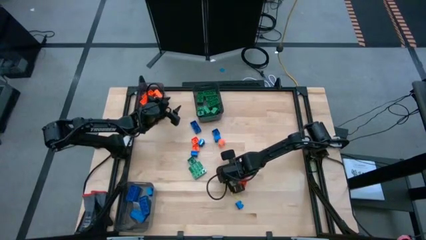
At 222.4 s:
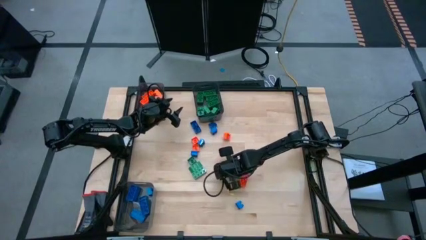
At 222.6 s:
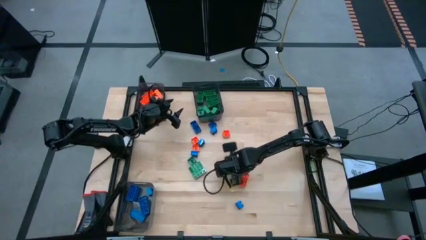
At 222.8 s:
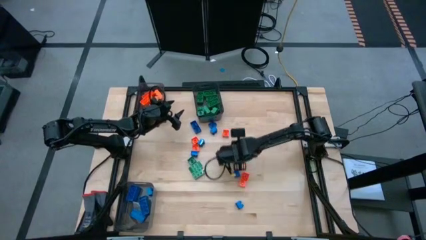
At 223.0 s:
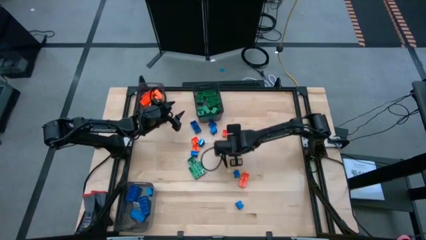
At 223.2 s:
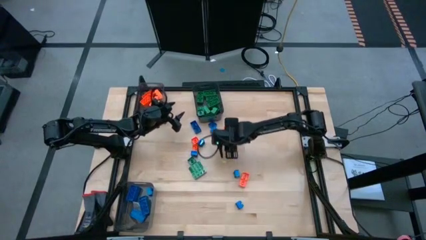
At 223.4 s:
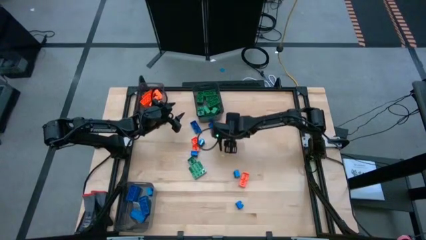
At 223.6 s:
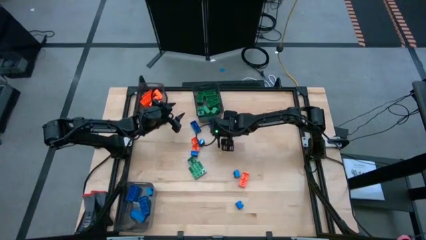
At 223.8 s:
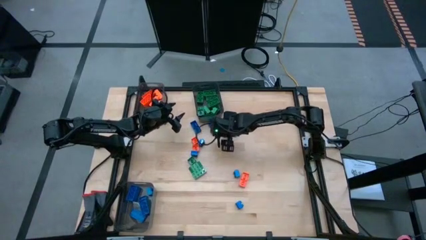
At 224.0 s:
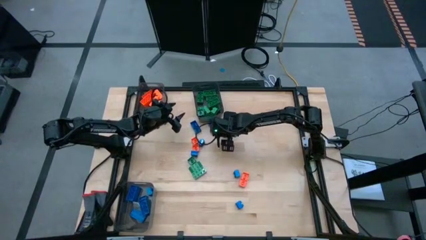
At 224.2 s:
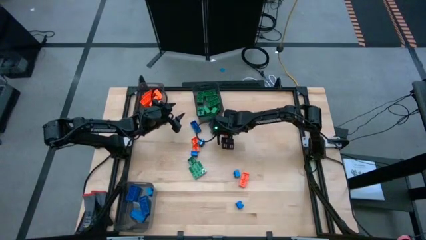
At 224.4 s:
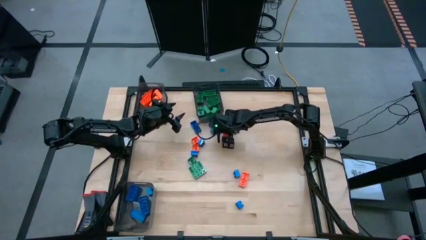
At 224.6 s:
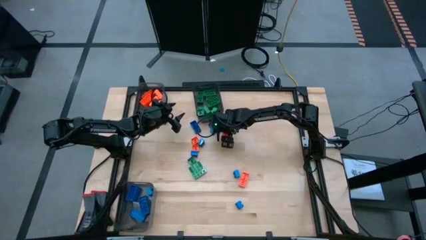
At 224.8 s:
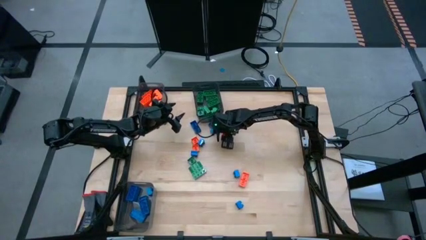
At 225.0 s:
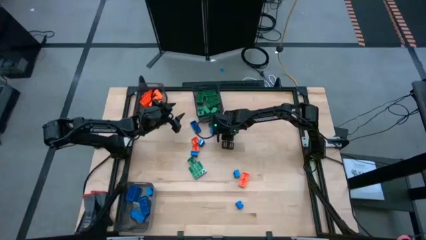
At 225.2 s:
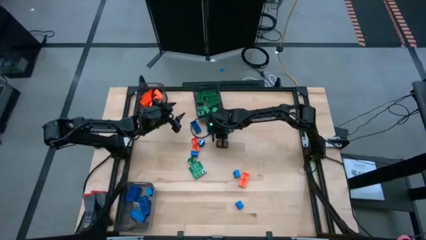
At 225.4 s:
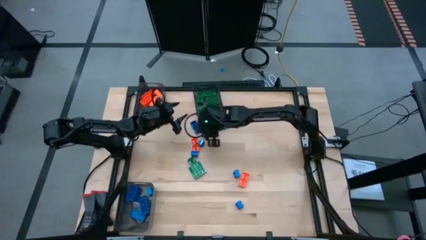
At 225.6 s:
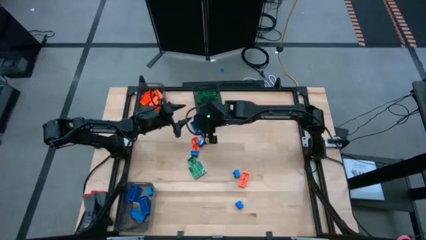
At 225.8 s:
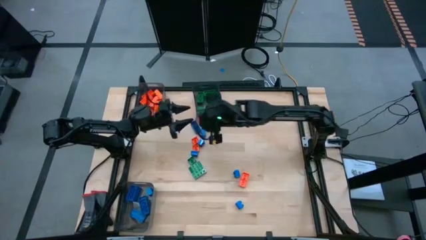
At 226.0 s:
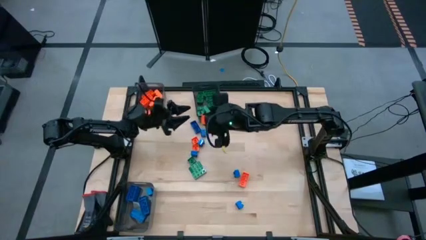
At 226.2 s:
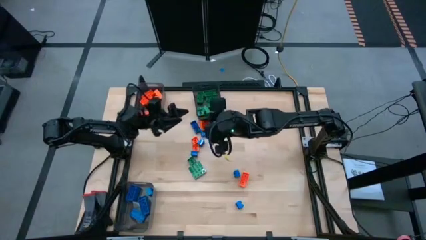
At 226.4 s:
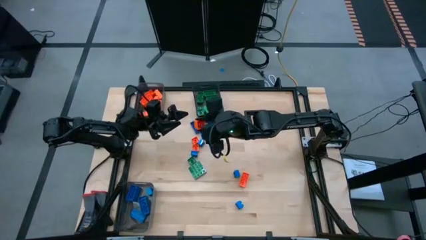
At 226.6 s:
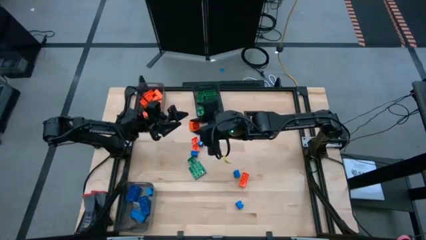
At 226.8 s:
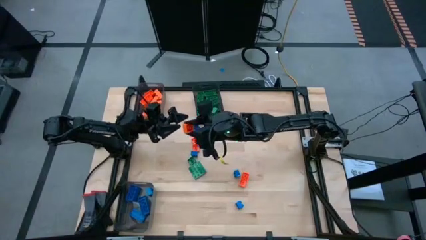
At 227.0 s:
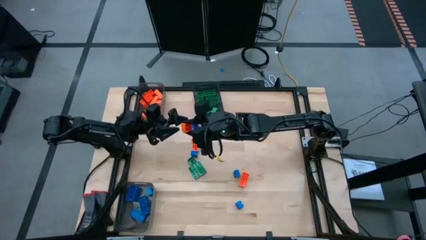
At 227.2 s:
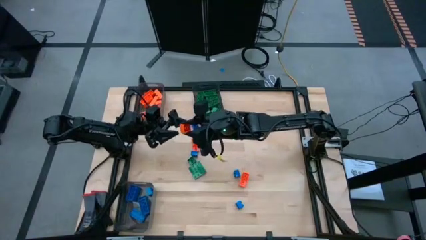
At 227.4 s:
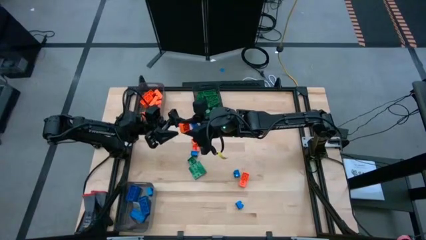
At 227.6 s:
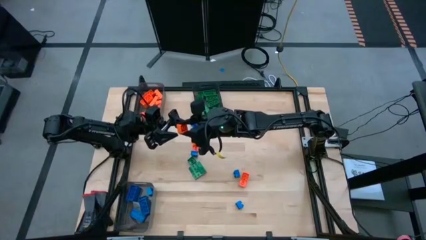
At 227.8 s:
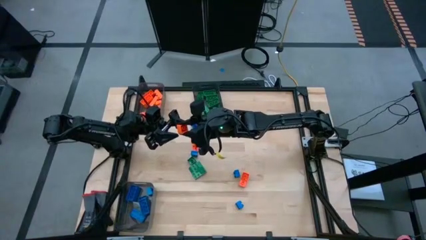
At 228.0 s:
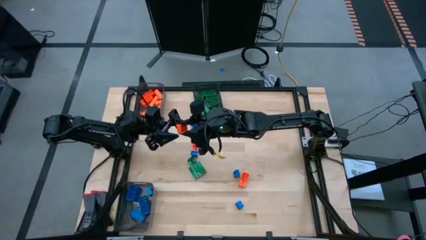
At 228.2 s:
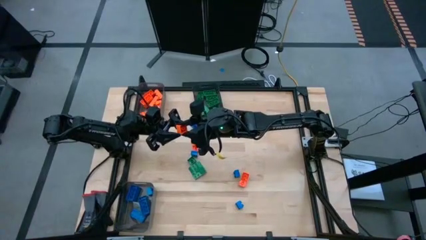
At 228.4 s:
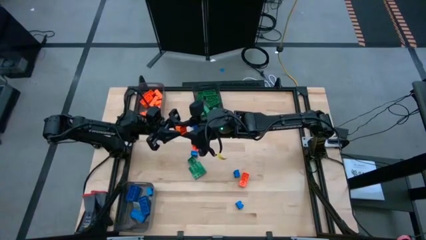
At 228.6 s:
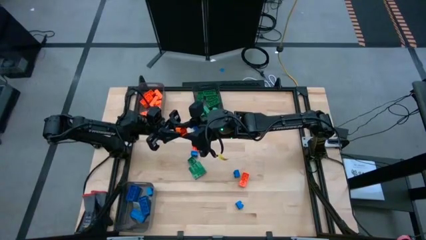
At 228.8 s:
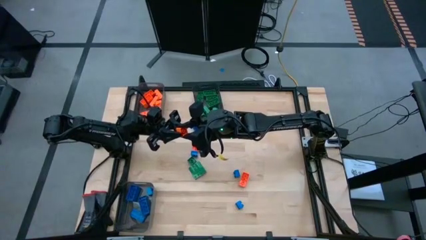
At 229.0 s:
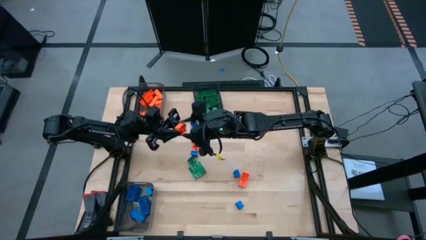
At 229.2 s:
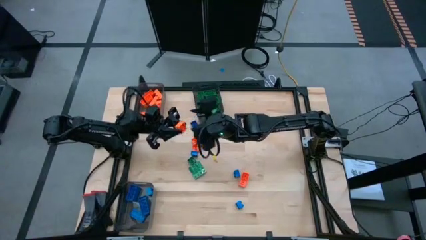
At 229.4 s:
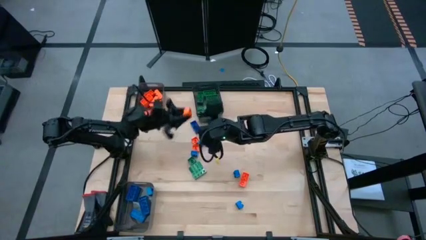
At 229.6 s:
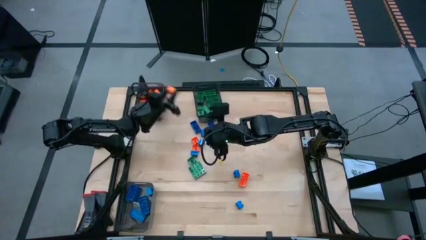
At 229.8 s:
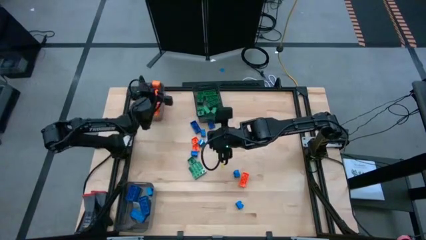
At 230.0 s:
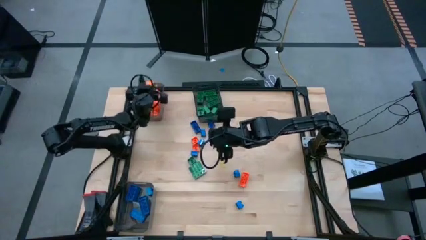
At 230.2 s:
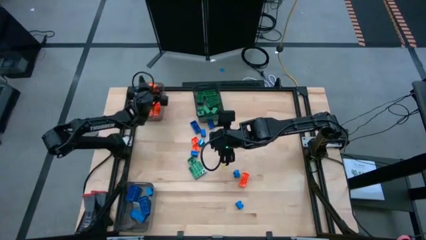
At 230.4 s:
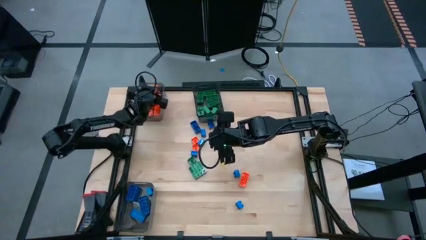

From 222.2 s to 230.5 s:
Task: Sort blocks
Put the orange game piece into the top left black transparent bin

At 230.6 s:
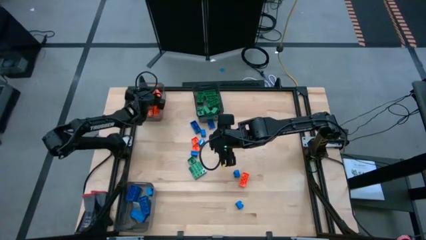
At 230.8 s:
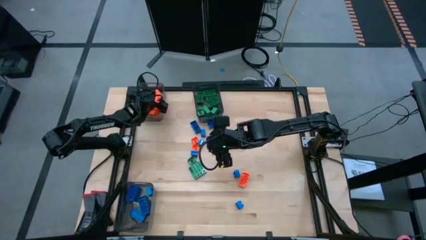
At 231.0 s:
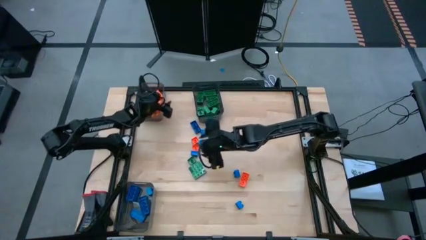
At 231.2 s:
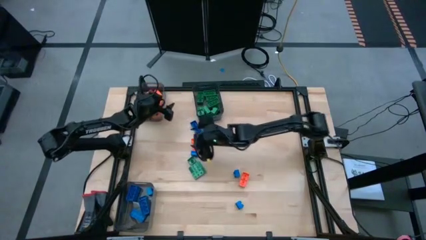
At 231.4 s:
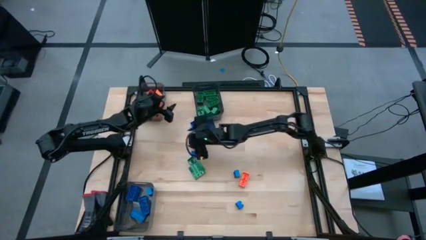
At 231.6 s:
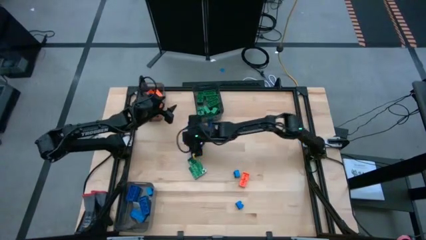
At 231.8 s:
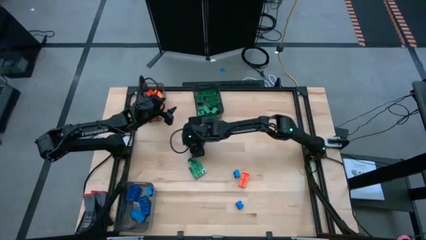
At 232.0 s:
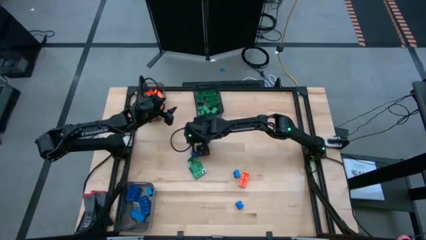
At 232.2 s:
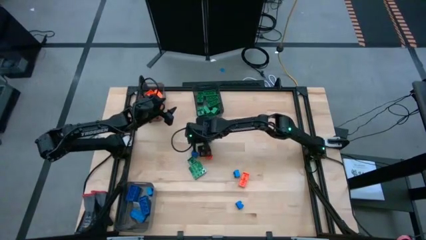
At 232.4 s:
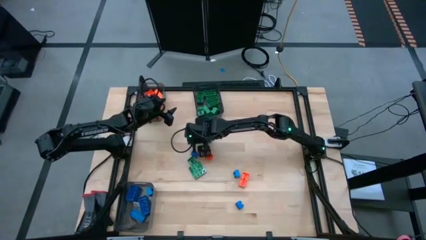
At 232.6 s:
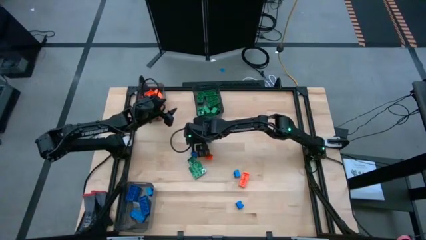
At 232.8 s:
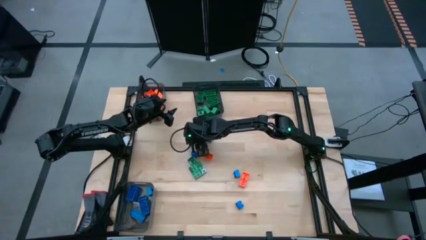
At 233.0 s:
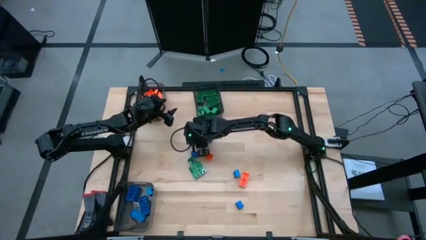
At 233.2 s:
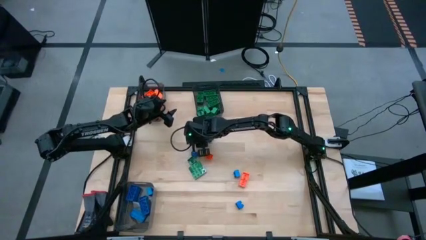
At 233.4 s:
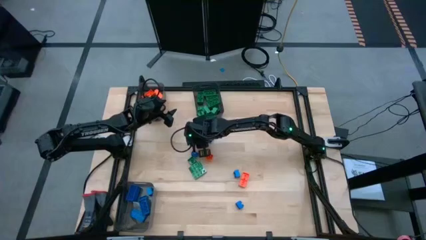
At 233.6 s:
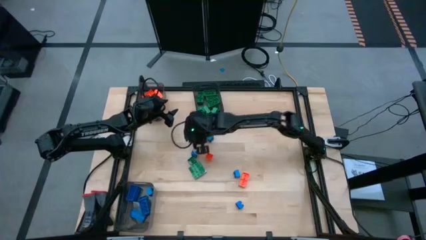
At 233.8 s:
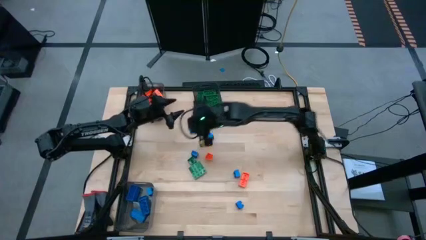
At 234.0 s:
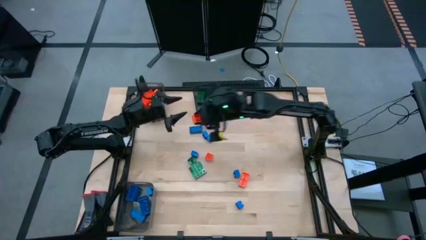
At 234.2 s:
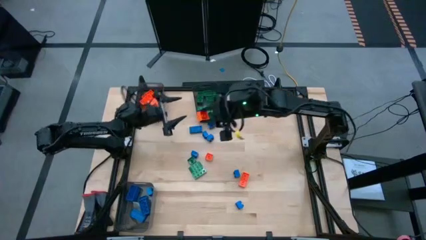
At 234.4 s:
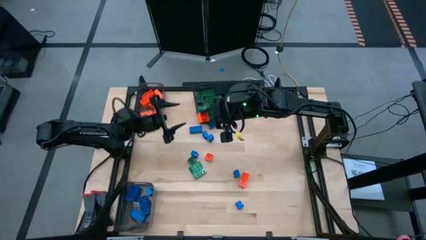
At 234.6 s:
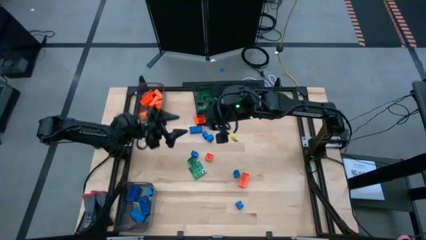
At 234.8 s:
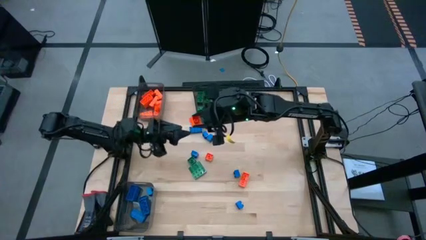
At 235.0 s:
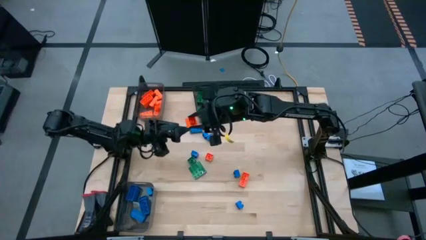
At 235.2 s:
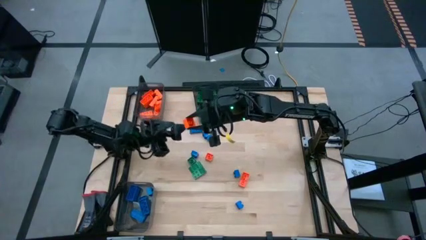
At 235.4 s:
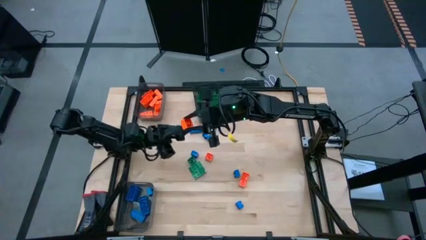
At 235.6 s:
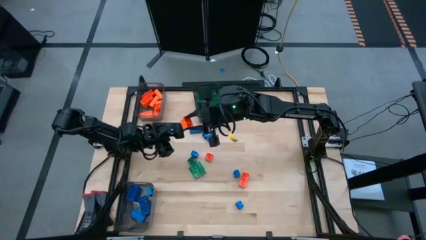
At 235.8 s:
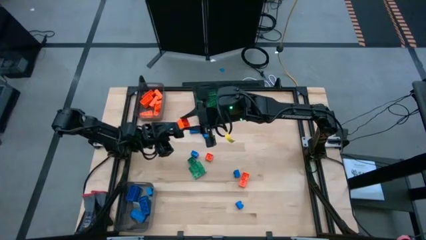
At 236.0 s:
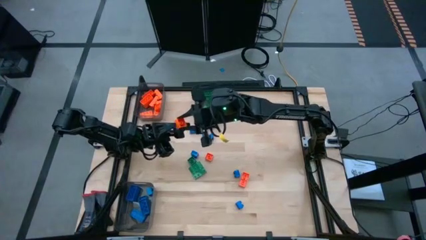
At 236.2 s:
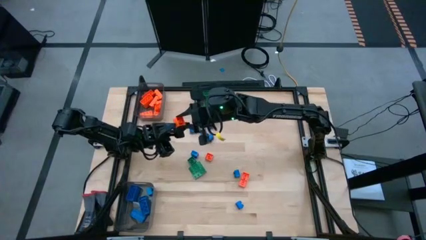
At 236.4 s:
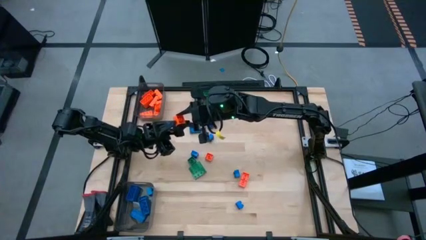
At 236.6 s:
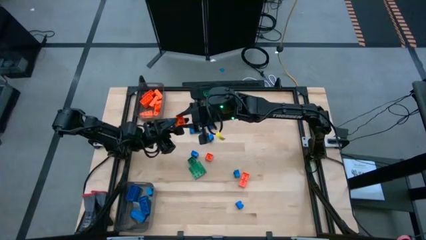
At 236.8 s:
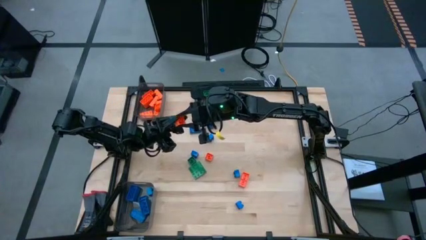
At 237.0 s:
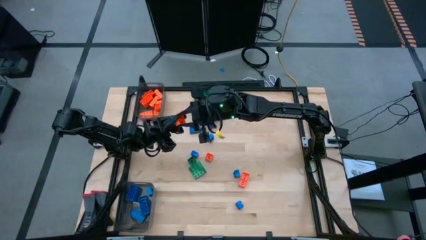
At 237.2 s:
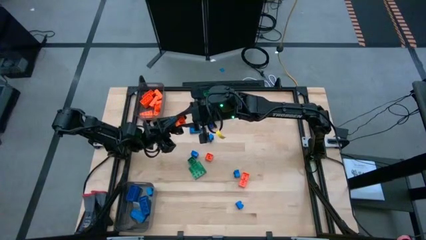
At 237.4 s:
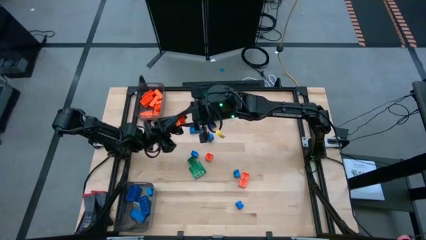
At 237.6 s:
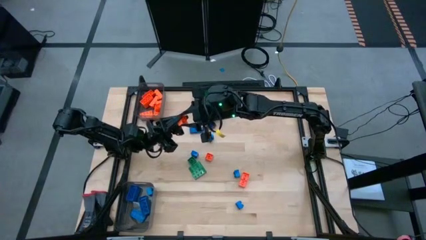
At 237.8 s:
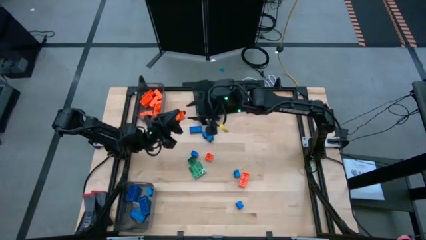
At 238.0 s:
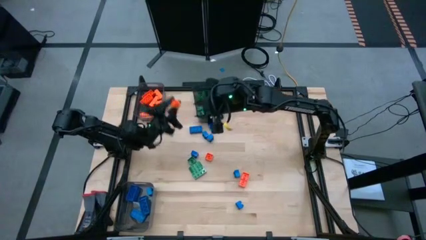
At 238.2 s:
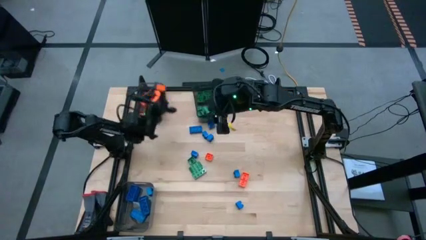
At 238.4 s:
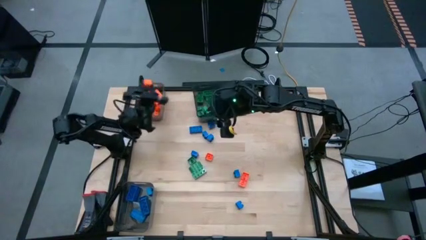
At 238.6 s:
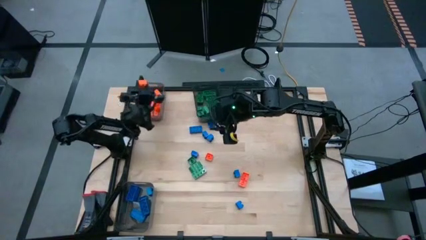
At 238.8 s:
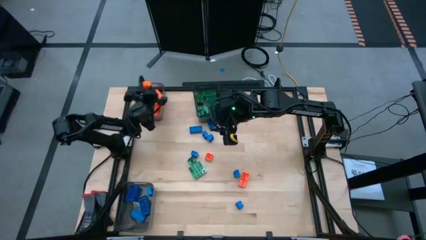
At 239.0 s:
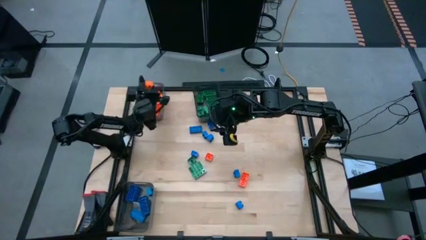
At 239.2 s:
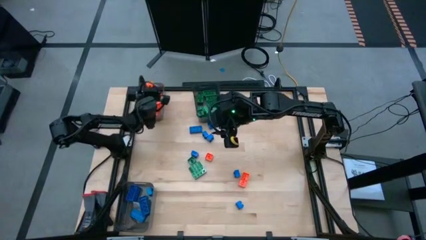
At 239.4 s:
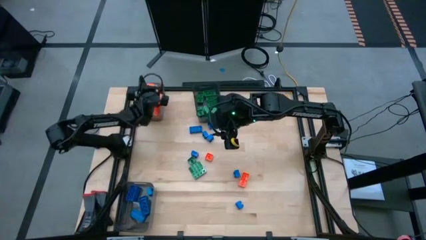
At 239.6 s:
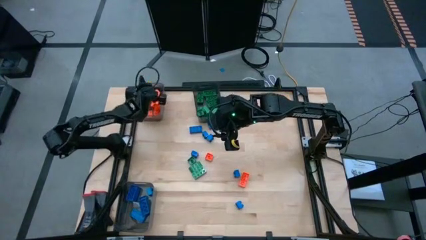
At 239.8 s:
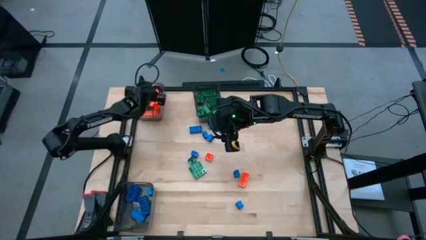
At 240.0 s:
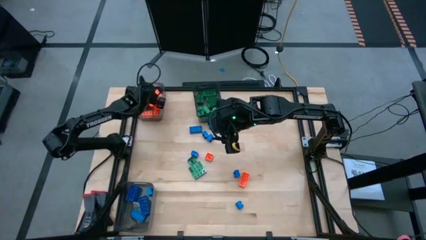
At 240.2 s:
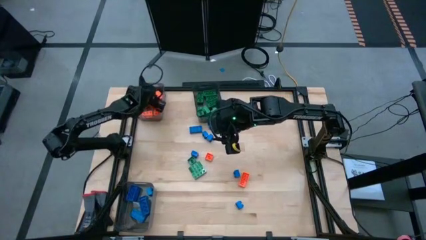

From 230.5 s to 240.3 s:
Put the orange game piece into the top left black transparent bin
